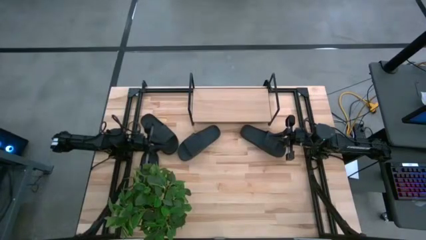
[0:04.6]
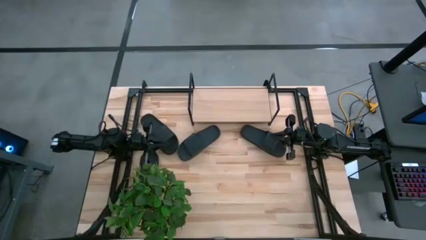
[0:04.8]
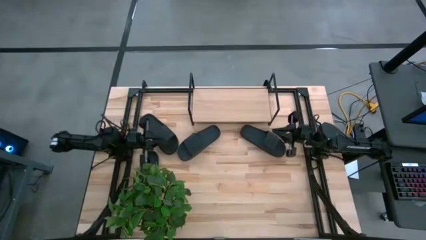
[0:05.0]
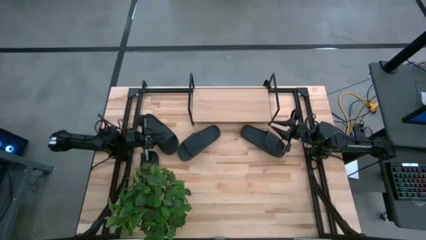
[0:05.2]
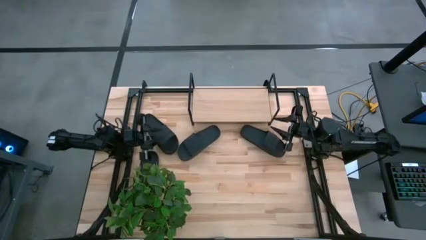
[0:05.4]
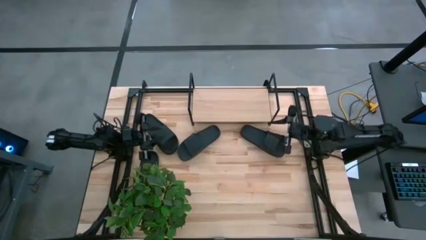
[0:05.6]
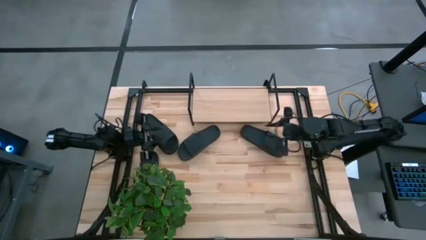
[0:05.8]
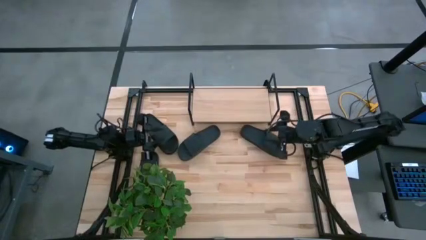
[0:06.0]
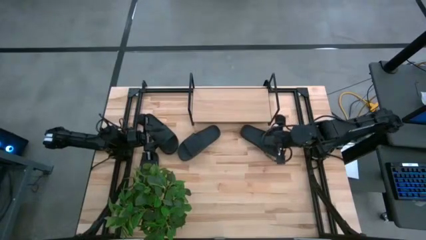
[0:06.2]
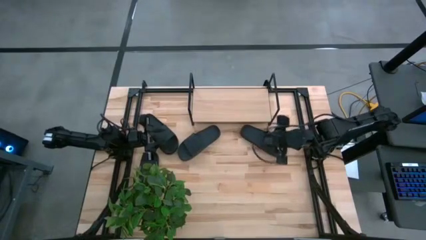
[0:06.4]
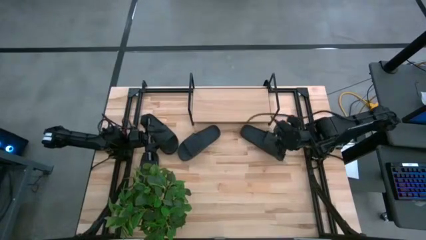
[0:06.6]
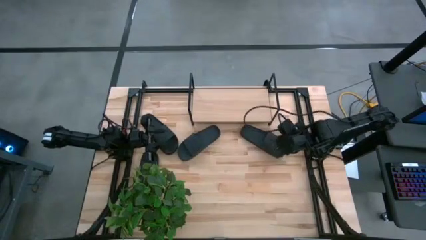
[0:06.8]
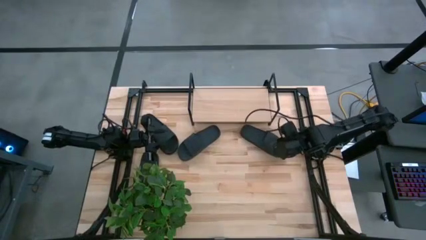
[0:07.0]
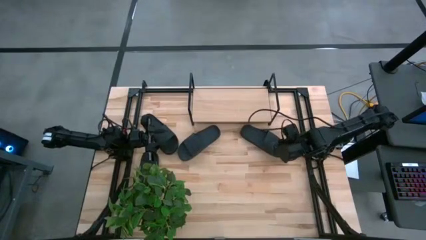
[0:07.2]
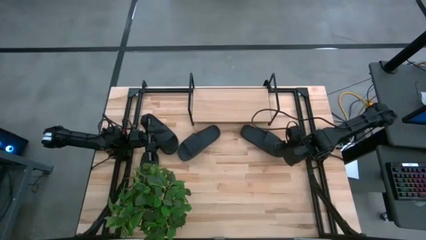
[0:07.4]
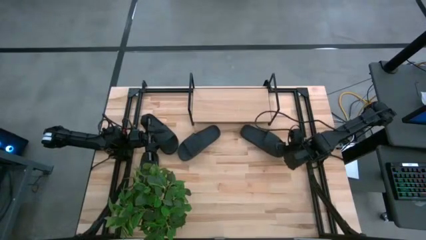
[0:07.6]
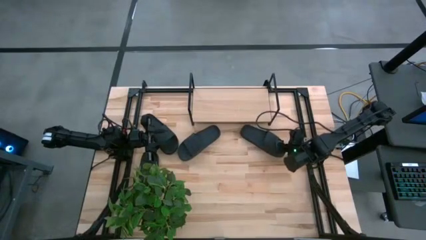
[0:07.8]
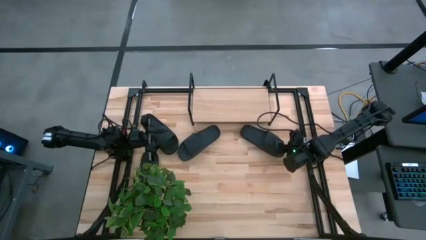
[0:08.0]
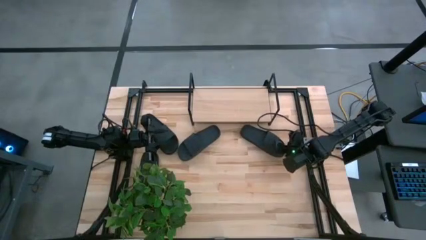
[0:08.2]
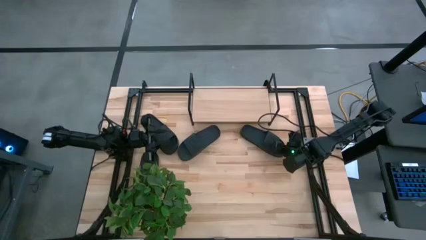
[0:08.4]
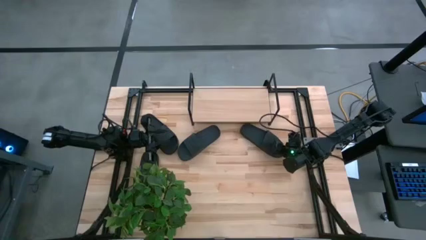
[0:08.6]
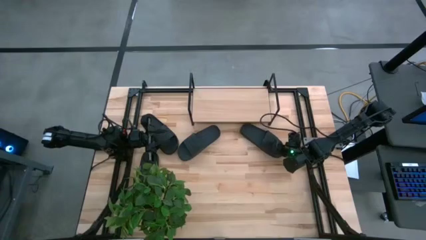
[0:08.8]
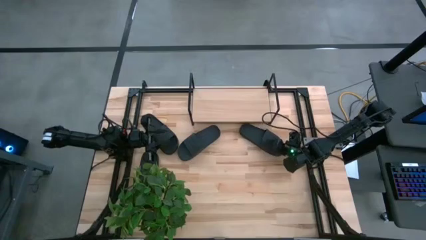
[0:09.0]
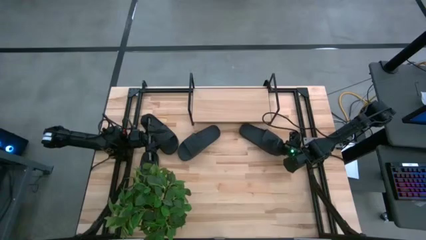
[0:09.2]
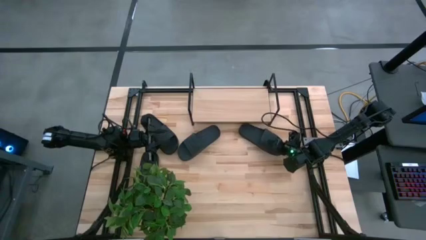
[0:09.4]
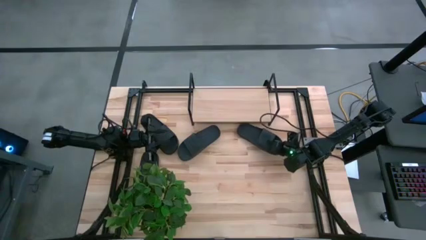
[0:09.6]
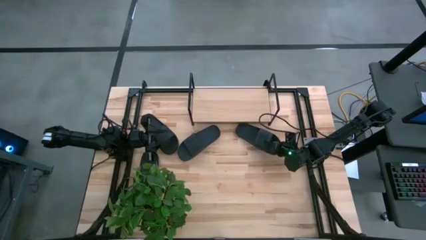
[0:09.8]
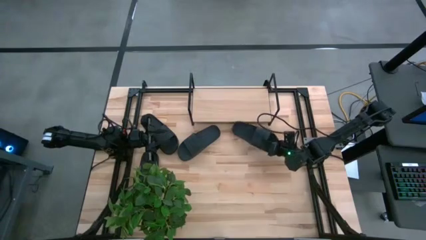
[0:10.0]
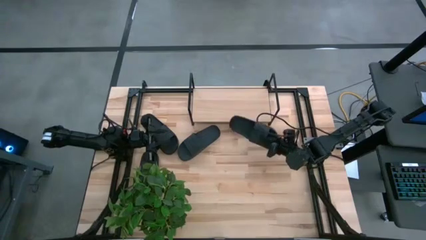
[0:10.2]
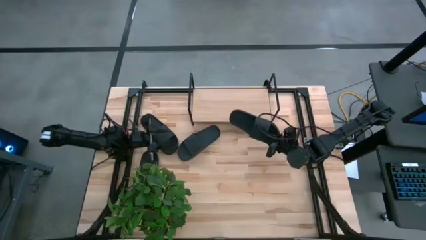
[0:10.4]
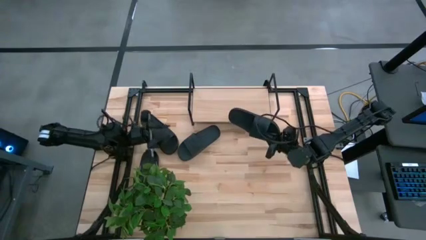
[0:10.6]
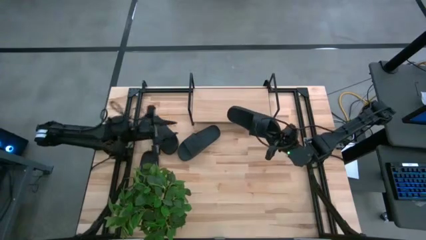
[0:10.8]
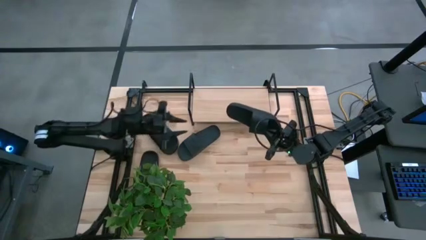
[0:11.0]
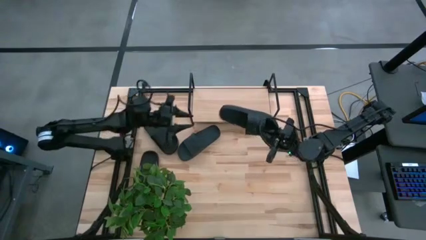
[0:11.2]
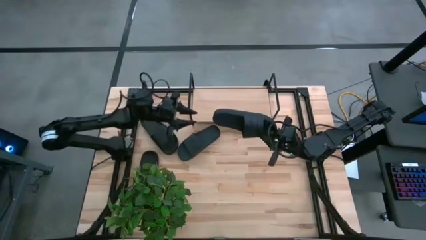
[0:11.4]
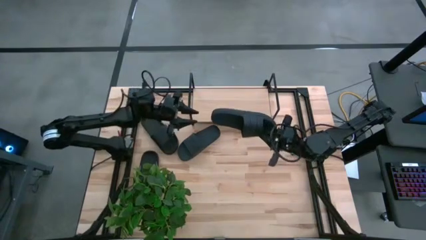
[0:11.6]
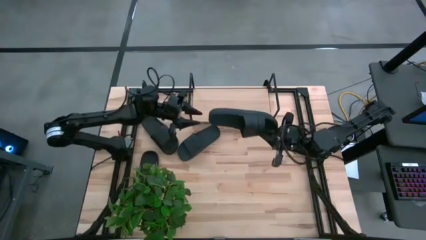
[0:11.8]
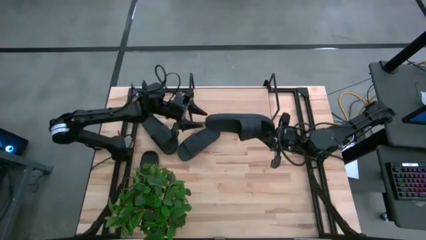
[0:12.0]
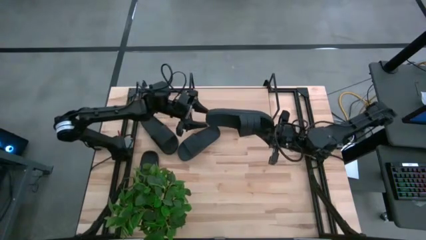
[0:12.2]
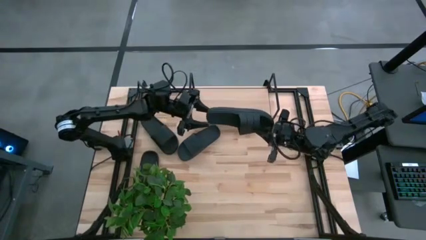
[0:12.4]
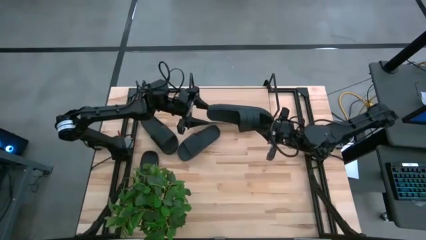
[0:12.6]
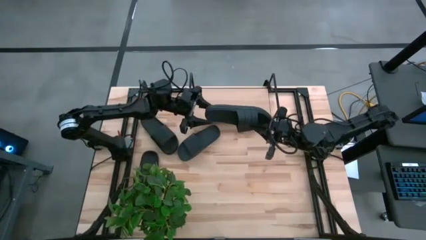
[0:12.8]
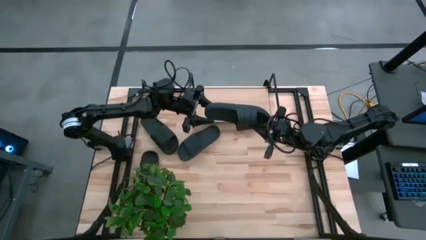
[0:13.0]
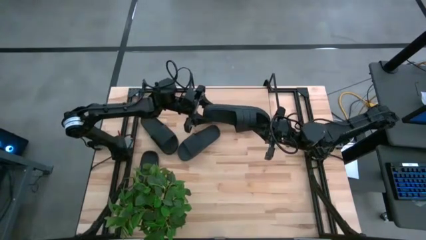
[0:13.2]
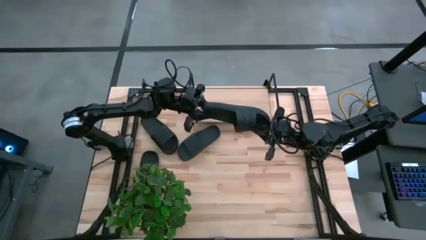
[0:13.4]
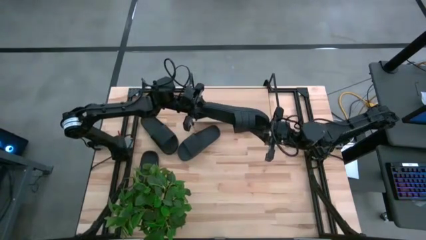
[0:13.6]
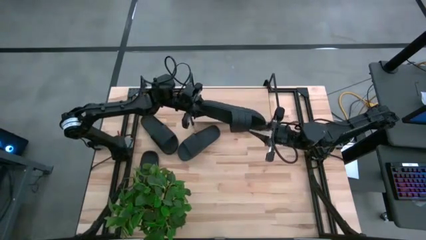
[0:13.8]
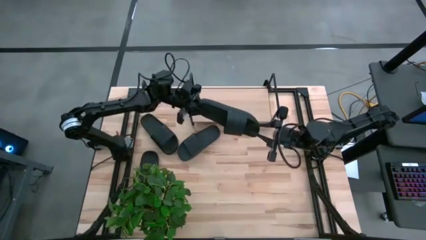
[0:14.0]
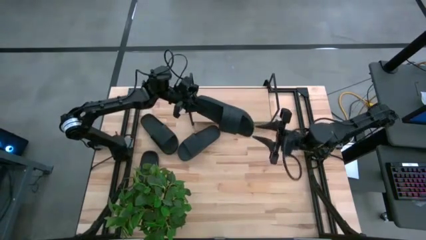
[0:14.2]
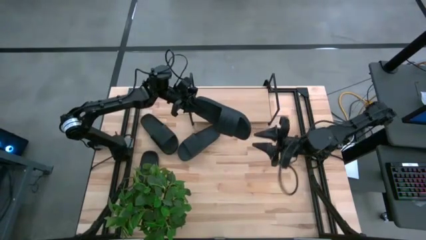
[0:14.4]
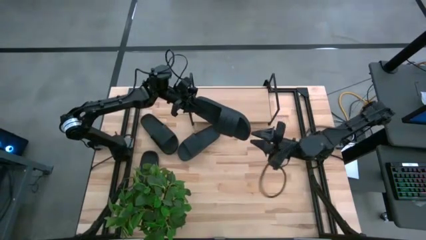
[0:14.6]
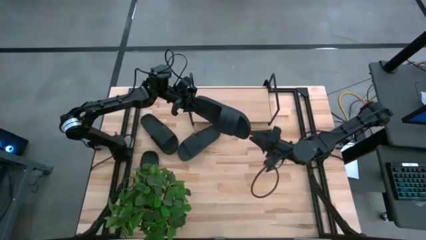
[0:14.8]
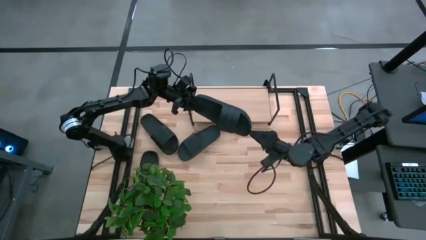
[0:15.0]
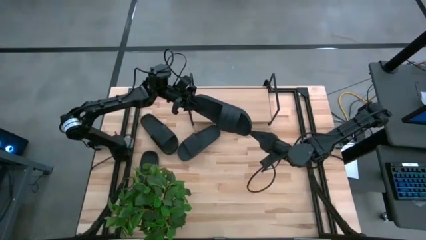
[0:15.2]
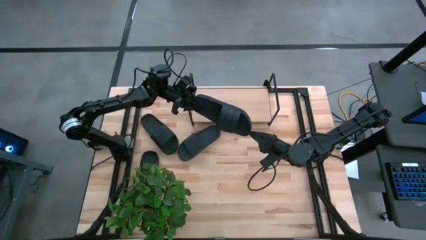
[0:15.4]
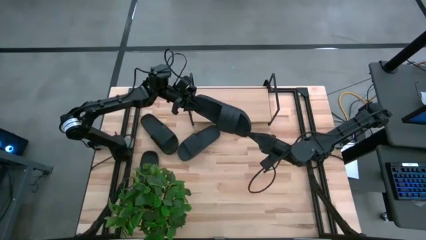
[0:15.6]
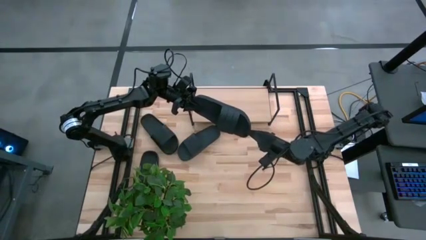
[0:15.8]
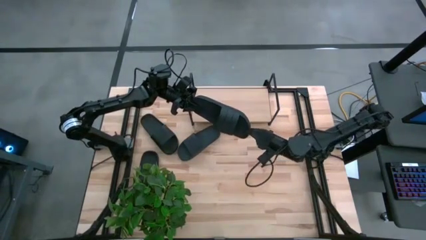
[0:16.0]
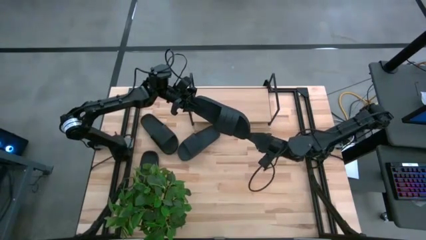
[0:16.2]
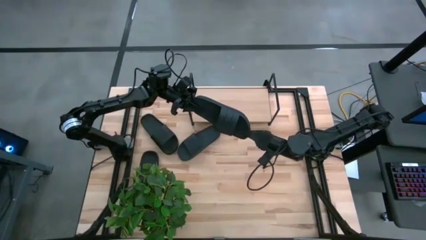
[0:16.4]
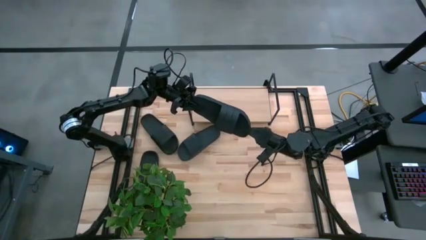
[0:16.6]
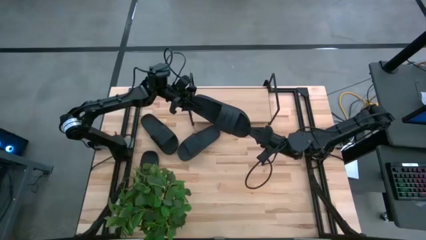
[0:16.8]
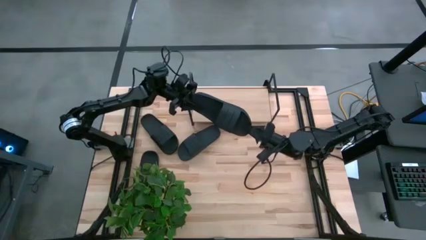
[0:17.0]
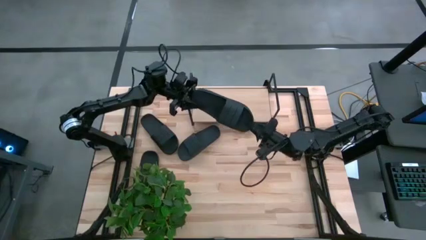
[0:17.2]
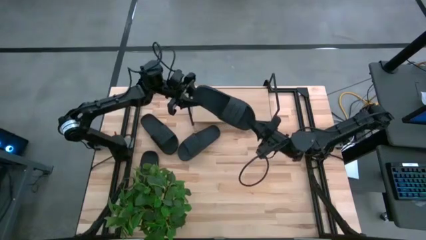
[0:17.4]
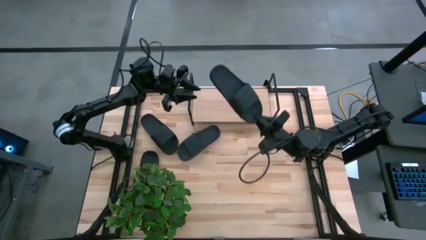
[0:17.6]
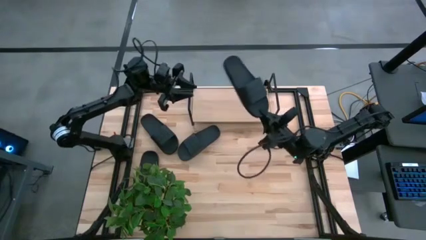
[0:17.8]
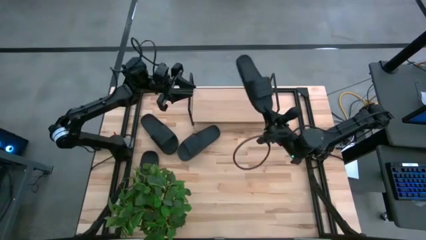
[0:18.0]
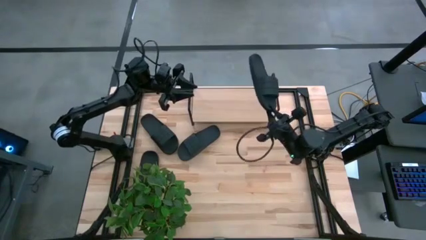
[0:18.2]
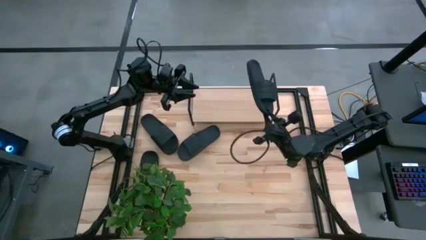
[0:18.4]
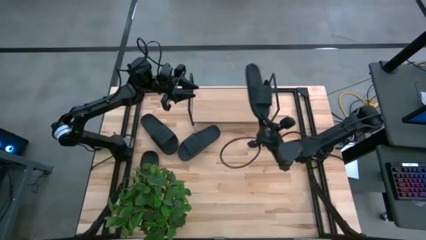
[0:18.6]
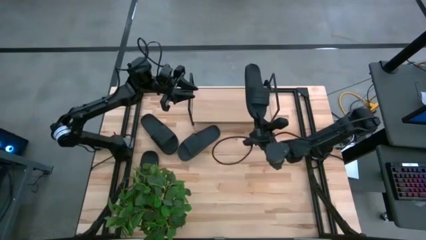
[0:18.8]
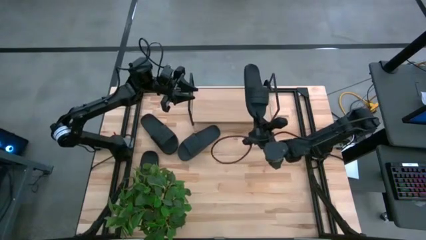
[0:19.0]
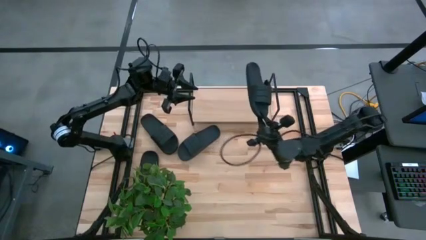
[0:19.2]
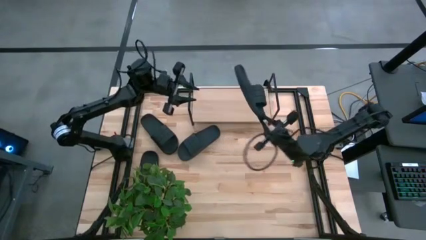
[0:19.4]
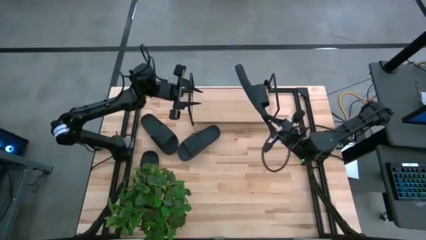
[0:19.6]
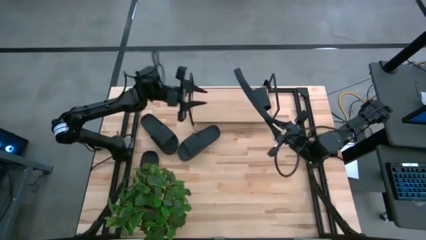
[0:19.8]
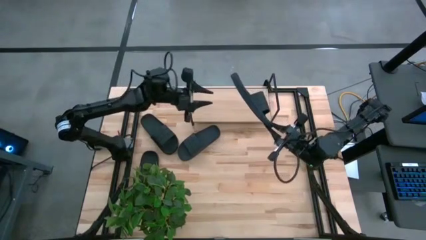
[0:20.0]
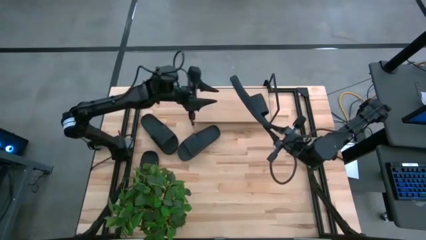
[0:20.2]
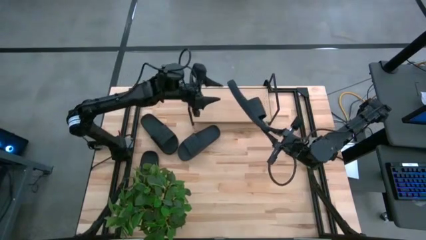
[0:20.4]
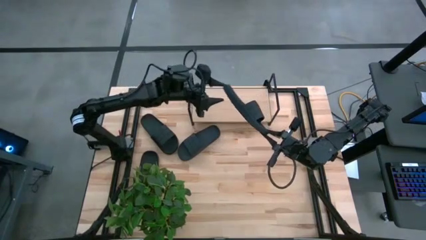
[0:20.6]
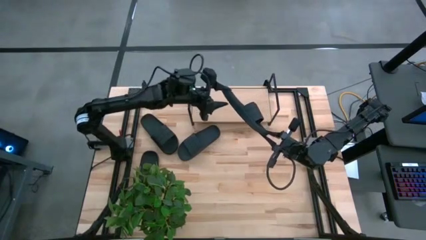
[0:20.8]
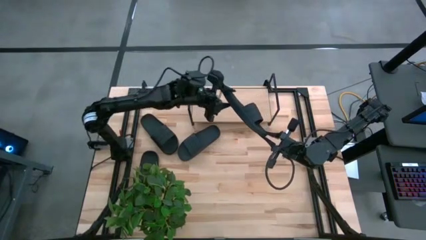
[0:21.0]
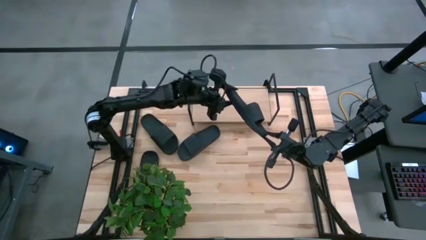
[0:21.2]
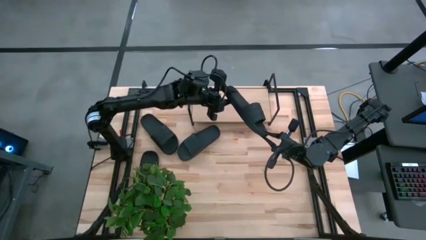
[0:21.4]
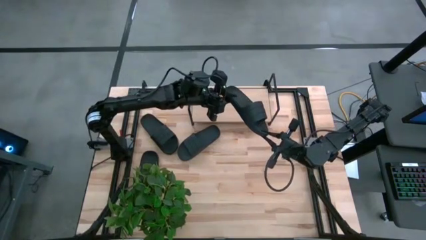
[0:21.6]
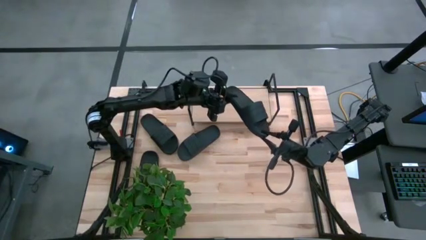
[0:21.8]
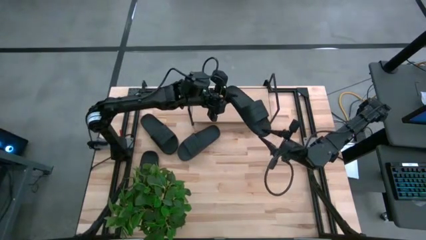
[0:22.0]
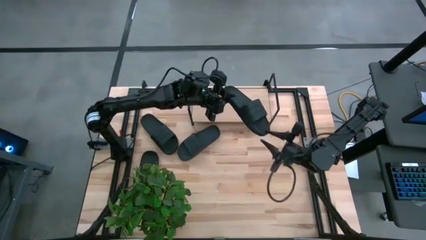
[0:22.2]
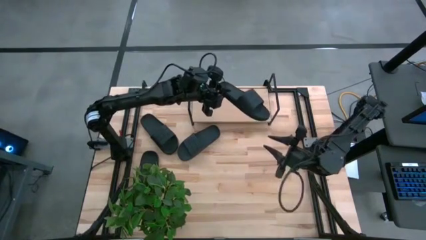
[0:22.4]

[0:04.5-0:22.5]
Task: Pick and place slides into the shelf
Put the black slipper on the shelf
